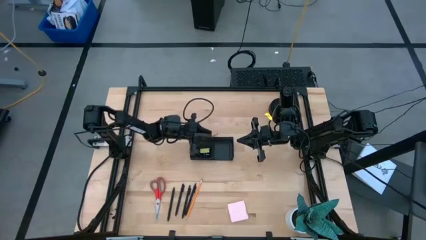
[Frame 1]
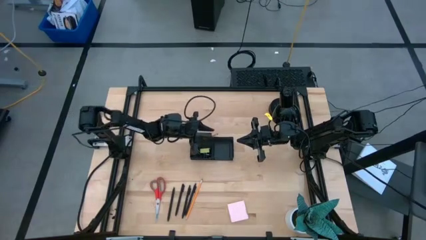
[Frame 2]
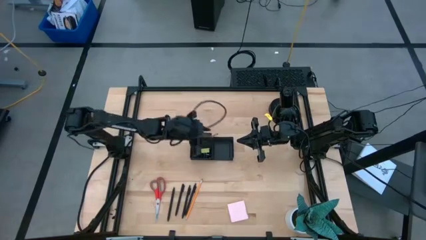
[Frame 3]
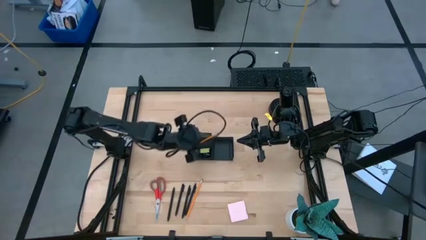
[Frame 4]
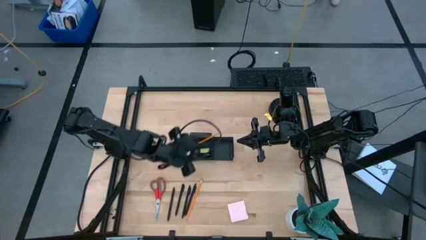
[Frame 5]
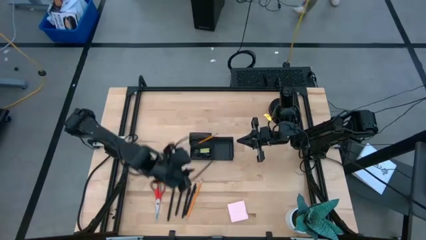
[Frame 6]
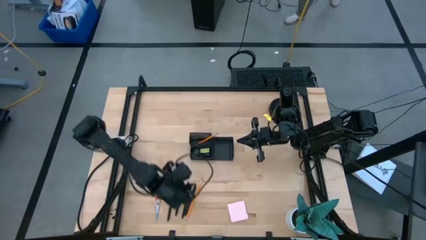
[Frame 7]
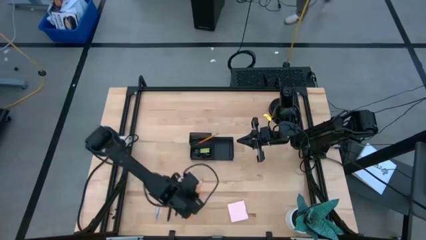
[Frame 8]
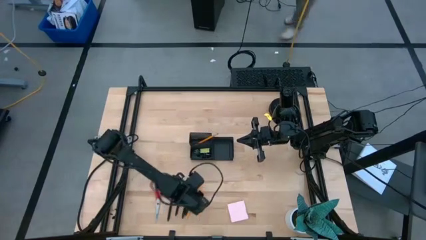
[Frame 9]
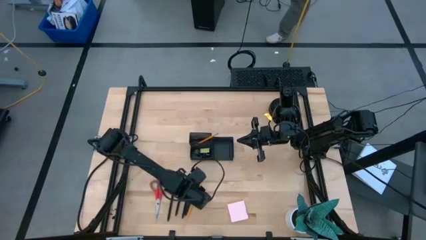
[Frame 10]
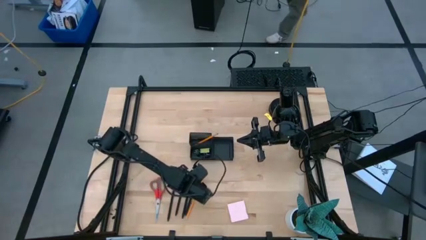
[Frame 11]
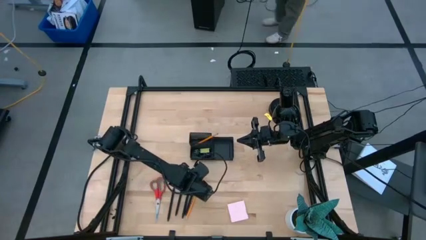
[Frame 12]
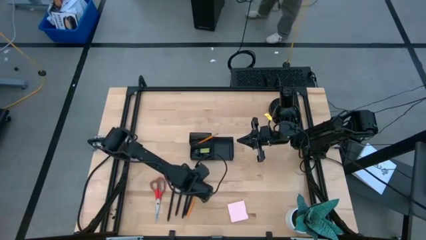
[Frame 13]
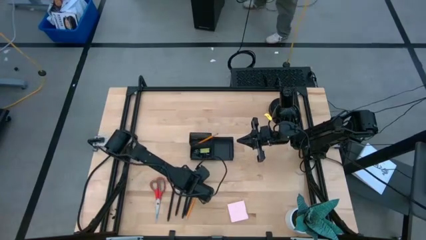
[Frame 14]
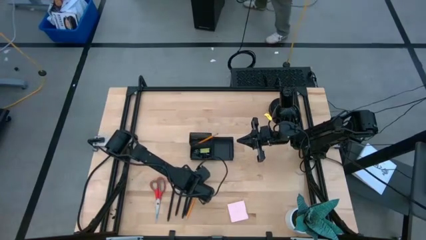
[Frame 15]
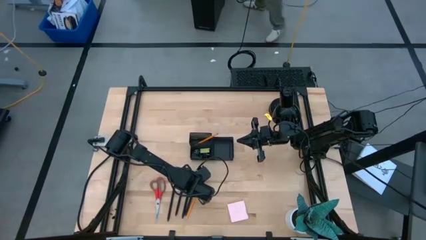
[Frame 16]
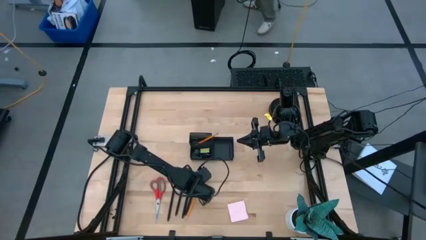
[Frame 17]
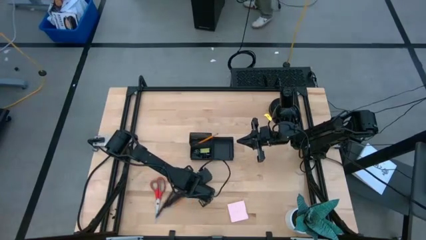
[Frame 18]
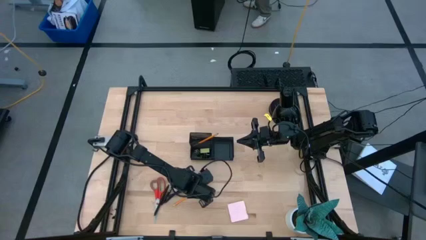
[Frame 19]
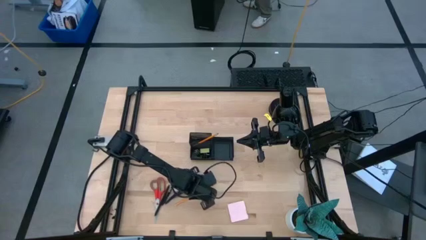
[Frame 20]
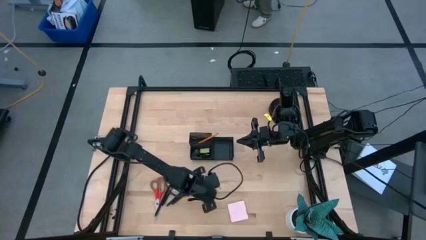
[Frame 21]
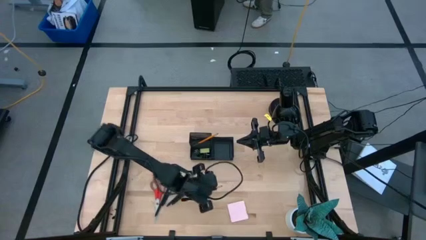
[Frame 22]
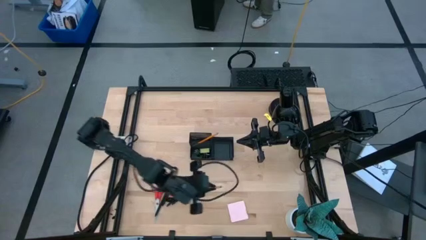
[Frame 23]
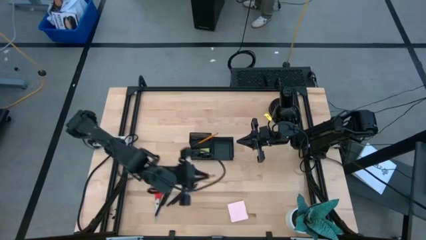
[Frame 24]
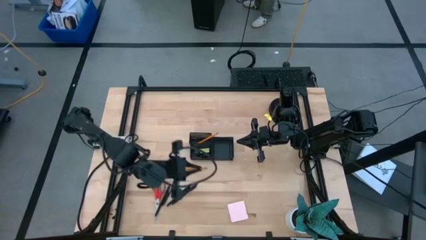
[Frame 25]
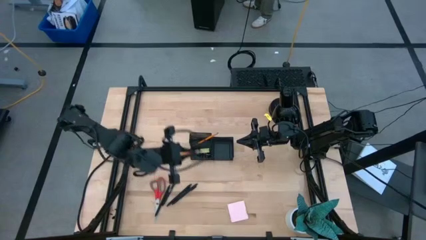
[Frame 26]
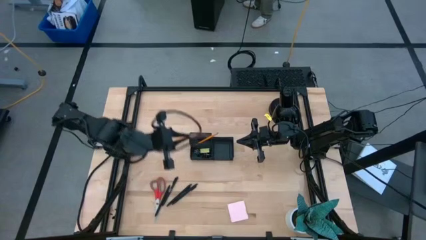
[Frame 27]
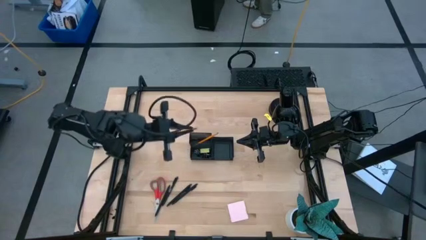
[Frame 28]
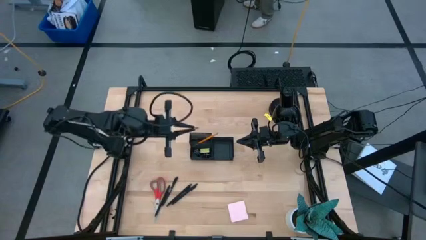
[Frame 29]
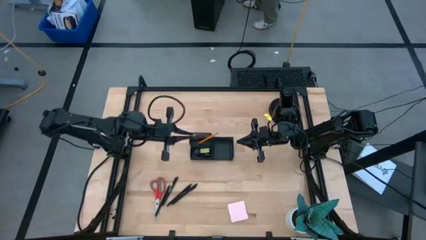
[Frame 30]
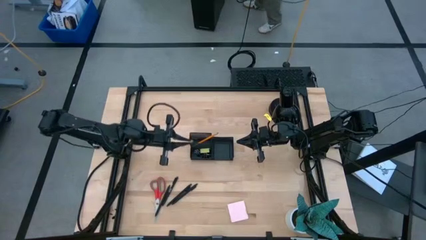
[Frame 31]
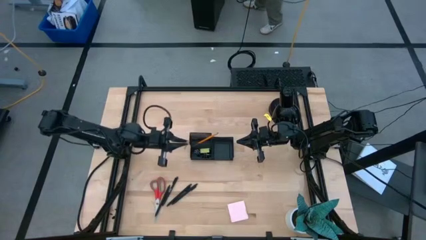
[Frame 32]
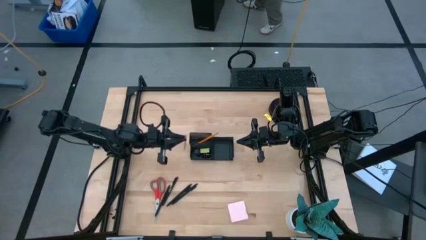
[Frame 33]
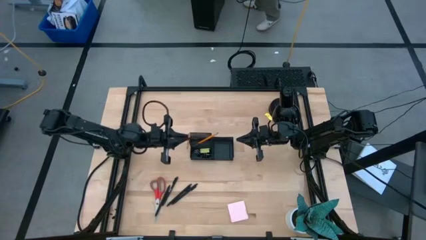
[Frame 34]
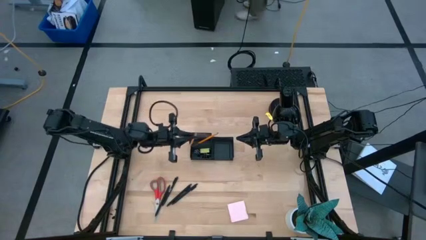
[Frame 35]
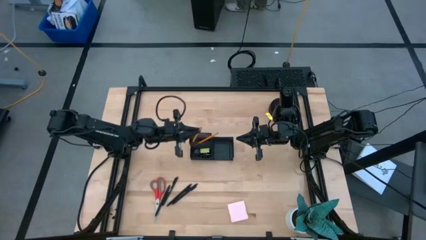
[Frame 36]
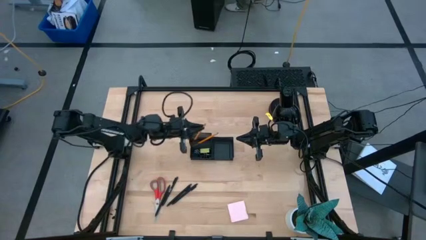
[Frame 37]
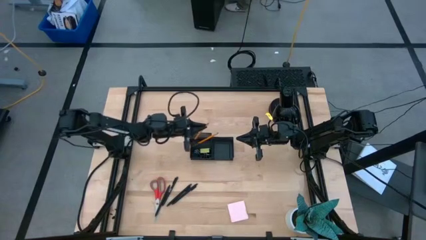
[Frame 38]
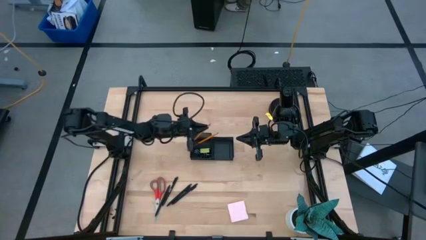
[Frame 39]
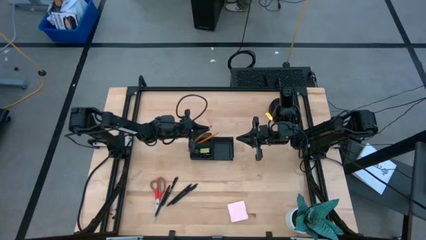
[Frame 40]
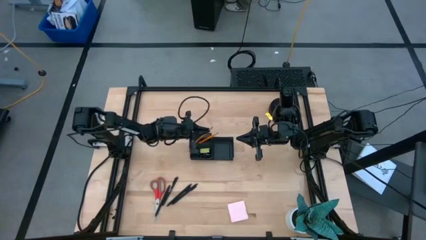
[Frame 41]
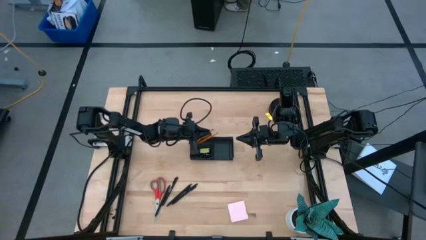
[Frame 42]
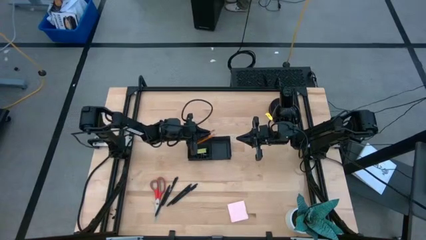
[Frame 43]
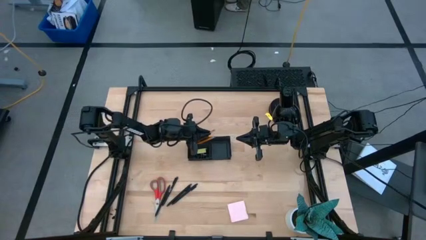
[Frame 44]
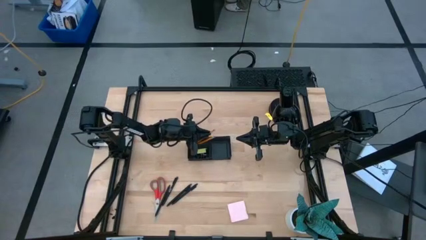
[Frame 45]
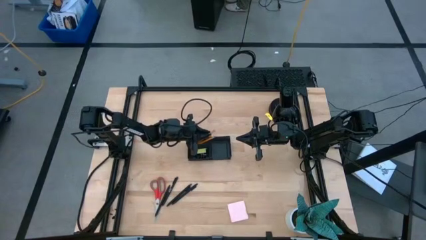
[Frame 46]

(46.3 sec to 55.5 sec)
Task: Pick and place office supplies into organizer
Put the orange pencil into the black desk organizer

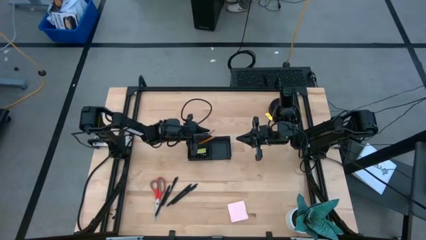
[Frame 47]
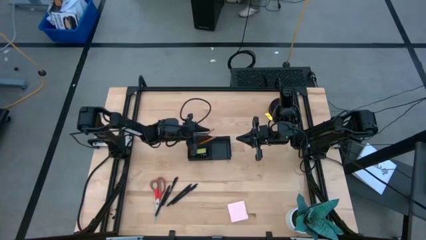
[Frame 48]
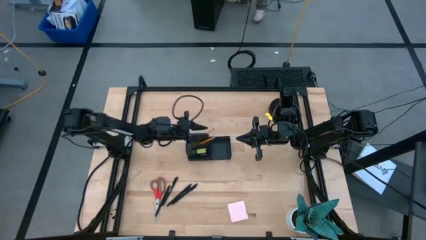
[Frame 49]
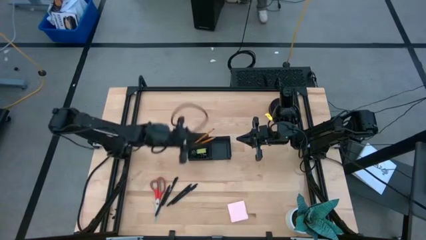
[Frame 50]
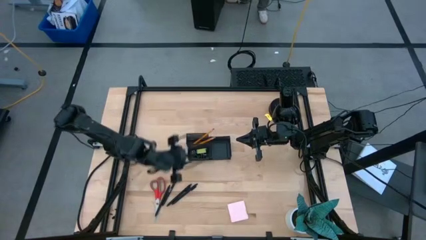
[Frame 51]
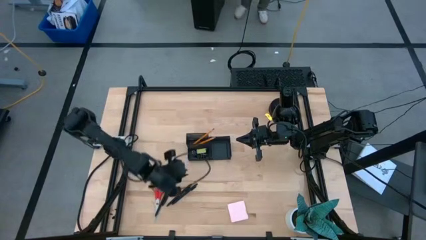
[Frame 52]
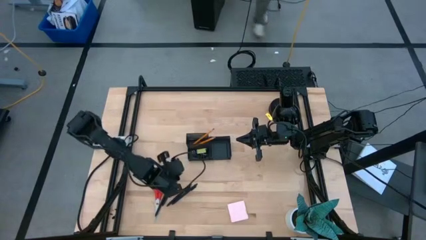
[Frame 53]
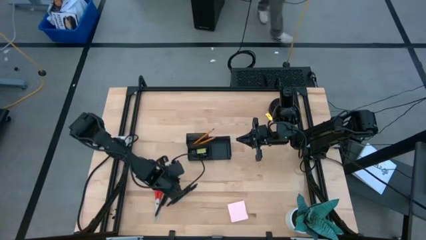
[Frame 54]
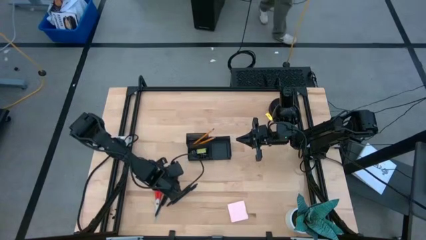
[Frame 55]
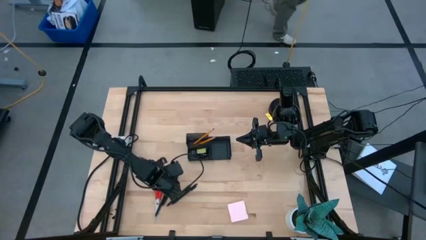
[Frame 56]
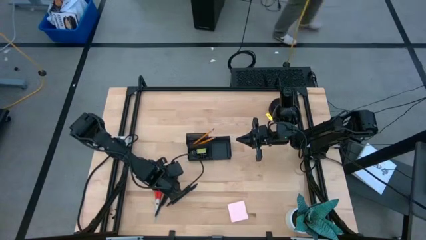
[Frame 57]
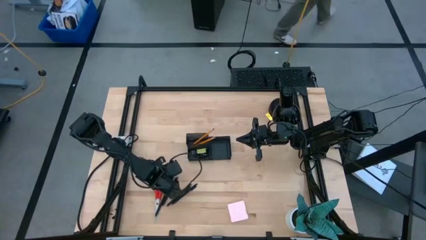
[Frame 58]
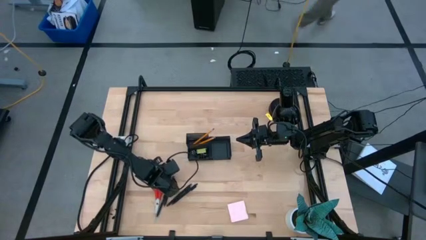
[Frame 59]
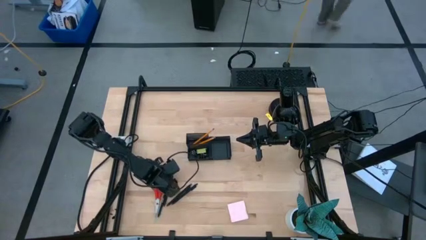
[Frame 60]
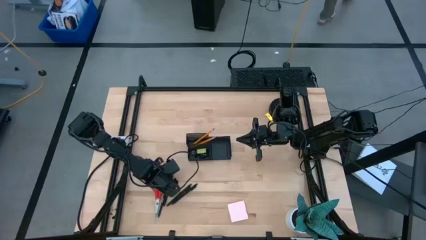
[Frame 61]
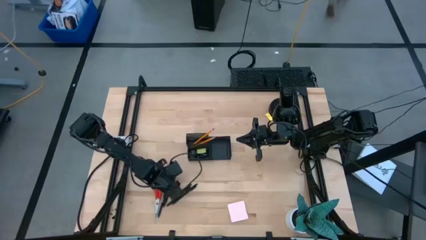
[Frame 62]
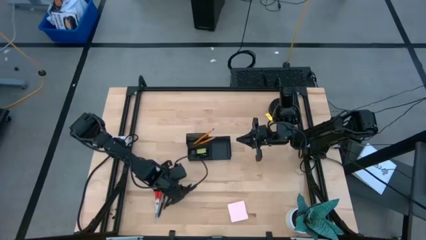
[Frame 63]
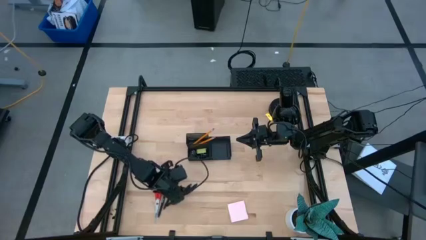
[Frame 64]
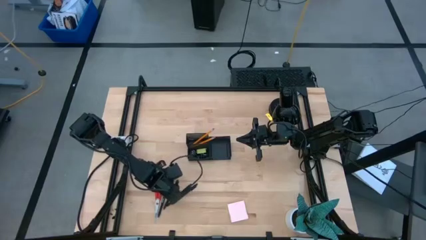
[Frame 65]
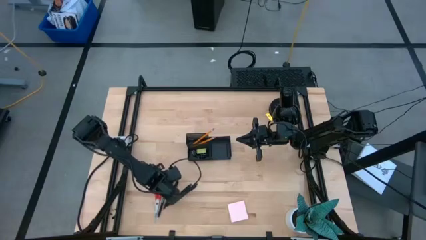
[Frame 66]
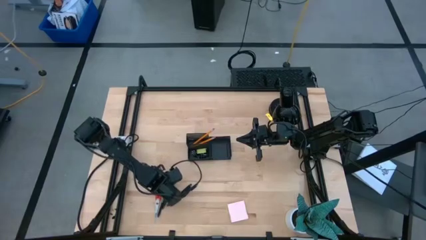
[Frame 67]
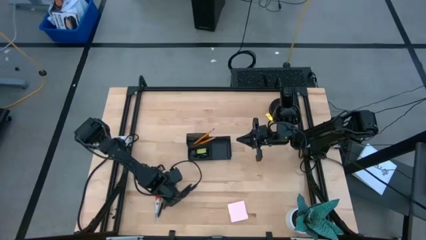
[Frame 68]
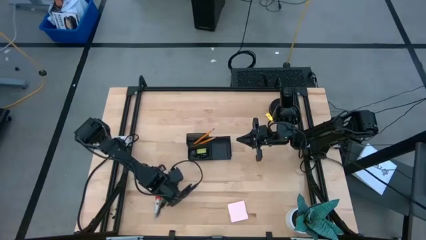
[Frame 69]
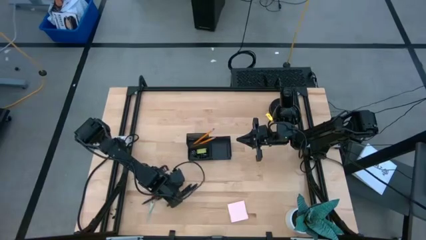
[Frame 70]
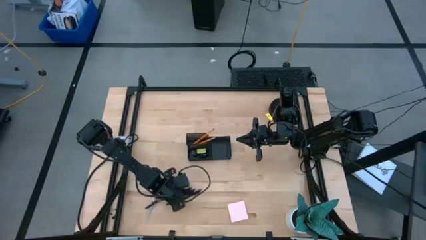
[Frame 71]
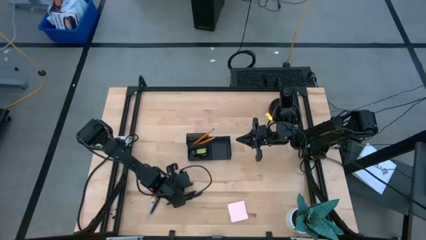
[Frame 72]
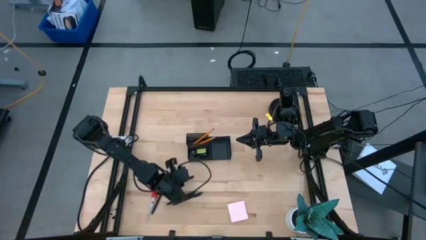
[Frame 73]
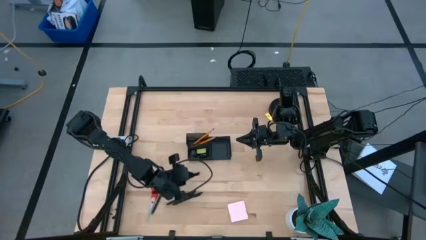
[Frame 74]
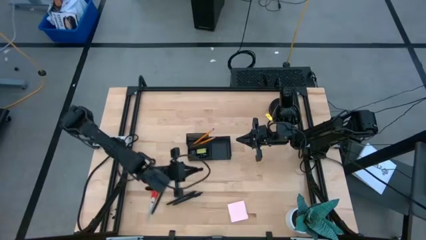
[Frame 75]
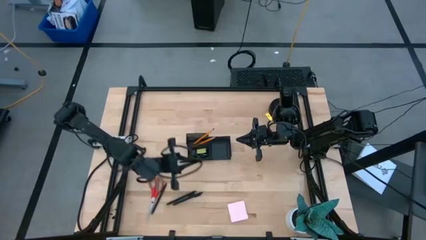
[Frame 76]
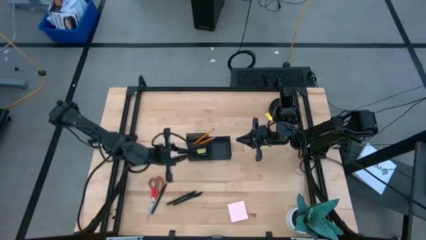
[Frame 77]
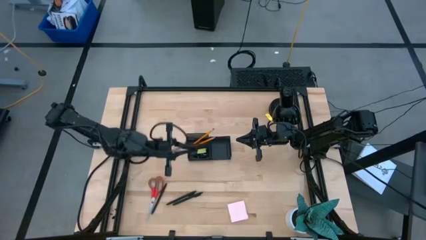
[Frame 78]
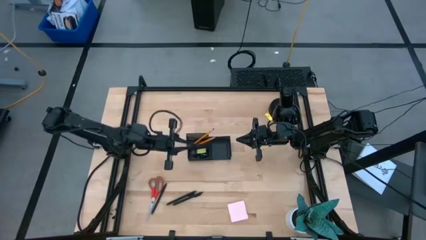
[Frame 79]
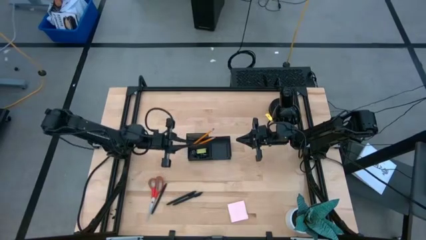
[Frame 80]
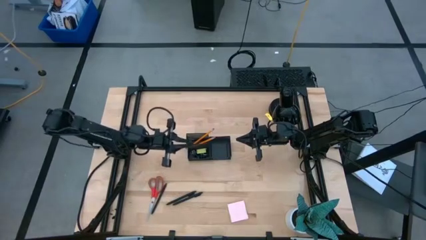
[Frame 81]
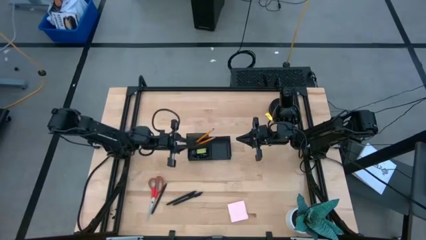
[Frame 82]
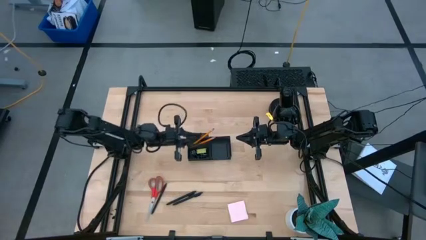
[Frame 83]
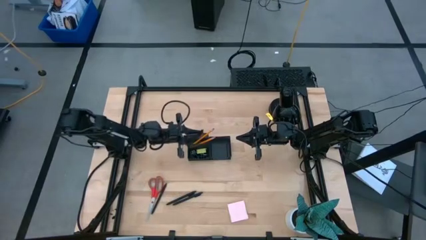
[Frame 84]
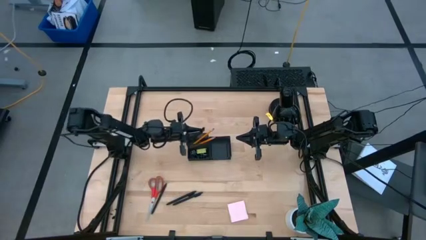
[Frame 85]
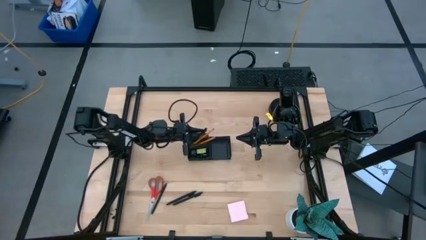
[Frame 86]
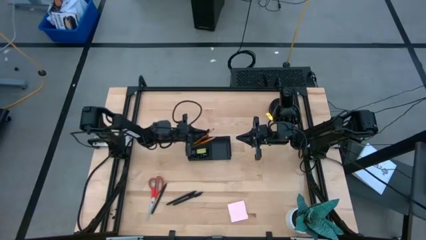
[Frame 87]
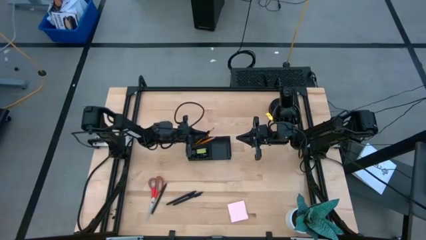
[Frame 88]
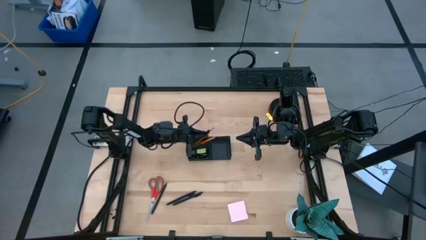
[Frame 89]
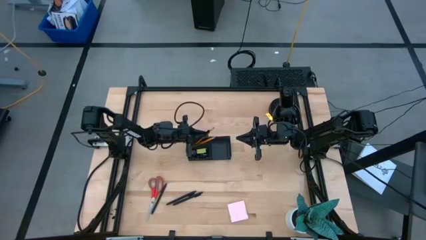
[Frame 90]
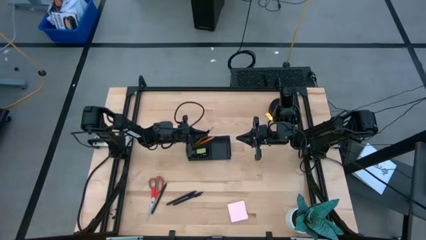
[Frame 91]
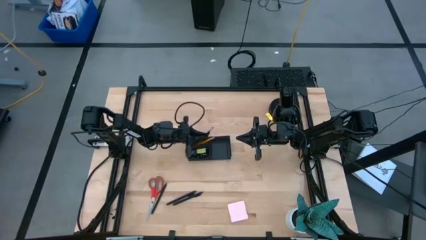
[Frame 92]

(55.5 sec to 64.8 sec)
Put the middle left black pen into the black desk organizer
